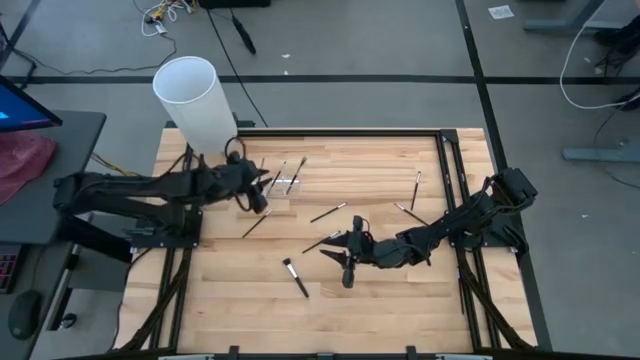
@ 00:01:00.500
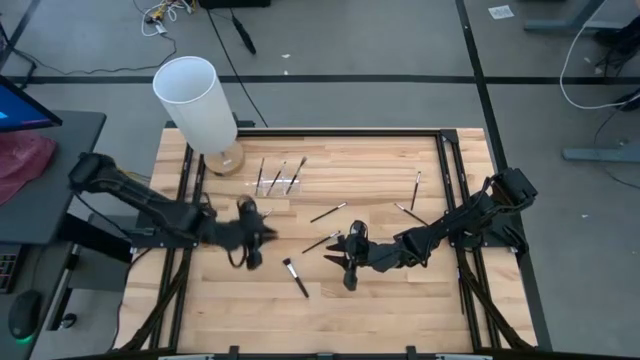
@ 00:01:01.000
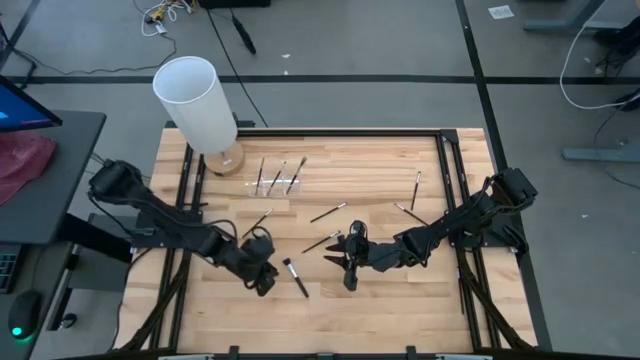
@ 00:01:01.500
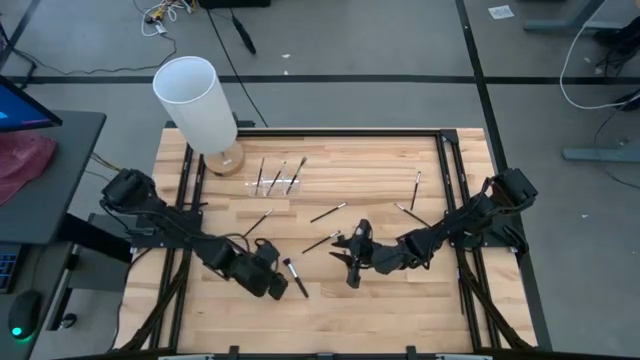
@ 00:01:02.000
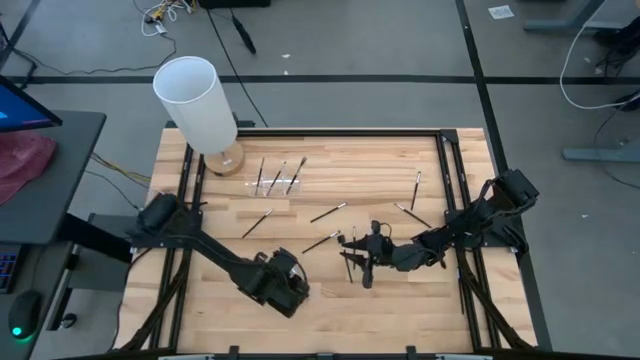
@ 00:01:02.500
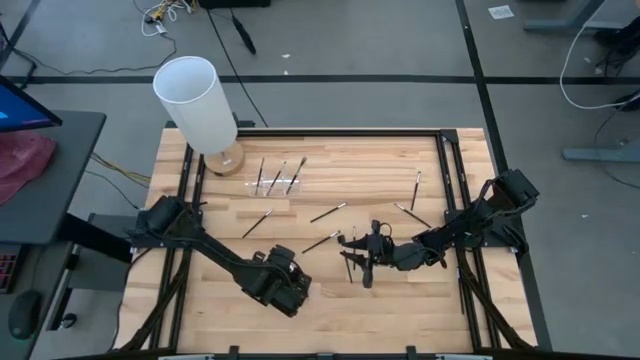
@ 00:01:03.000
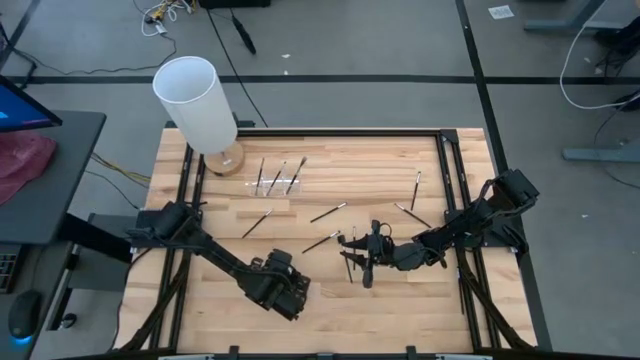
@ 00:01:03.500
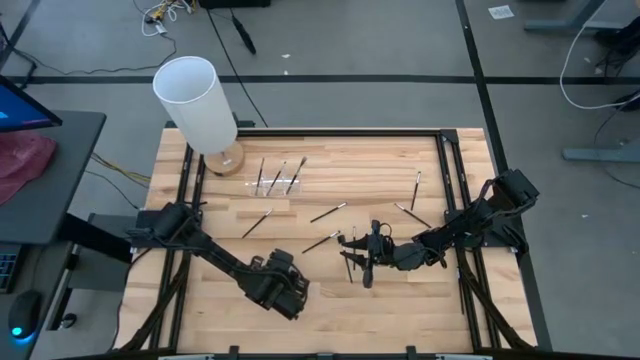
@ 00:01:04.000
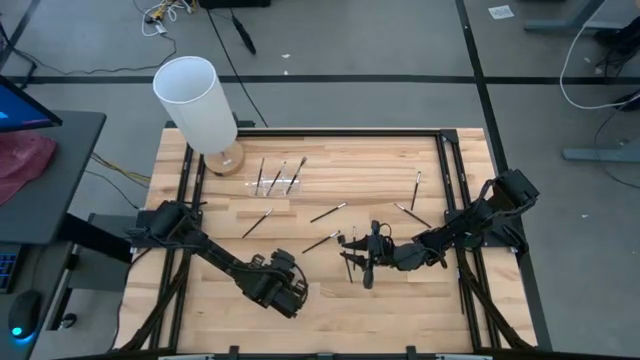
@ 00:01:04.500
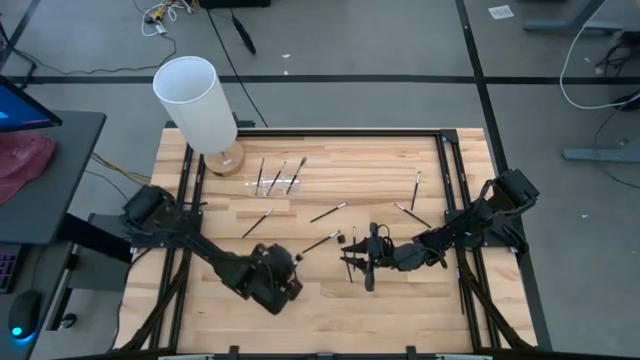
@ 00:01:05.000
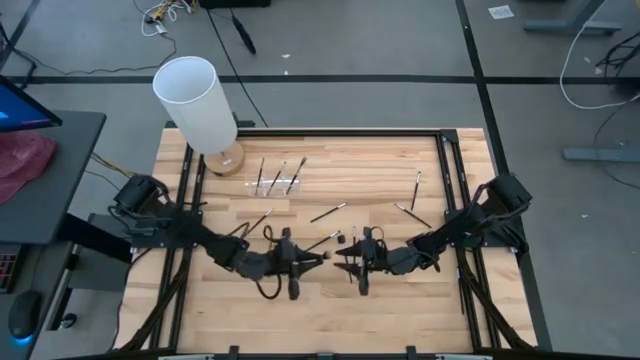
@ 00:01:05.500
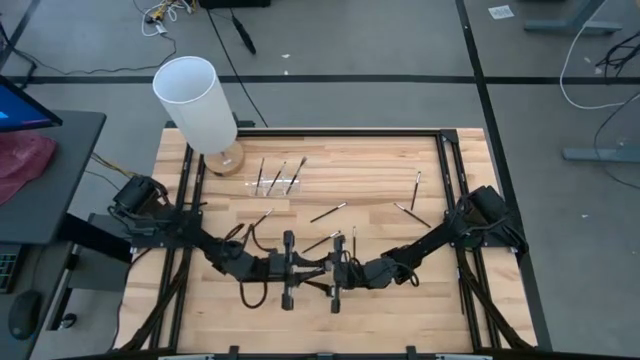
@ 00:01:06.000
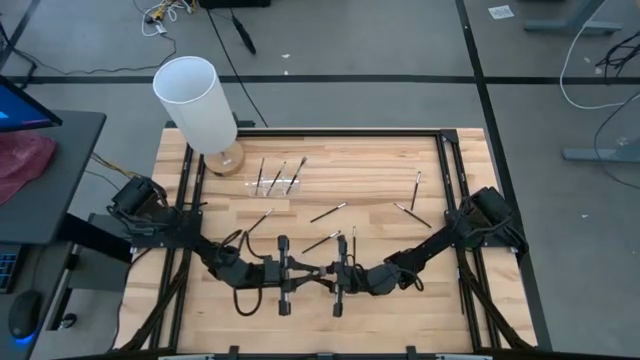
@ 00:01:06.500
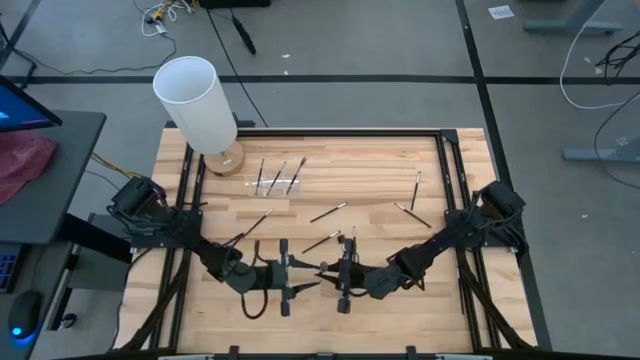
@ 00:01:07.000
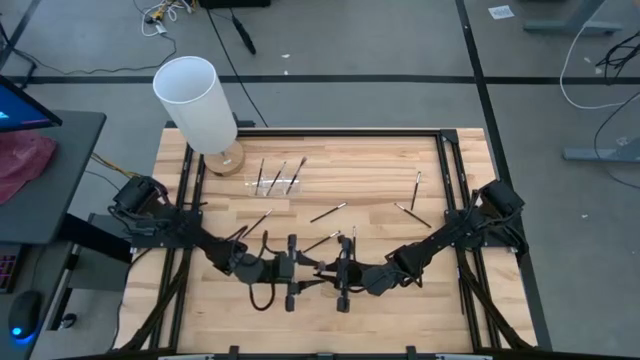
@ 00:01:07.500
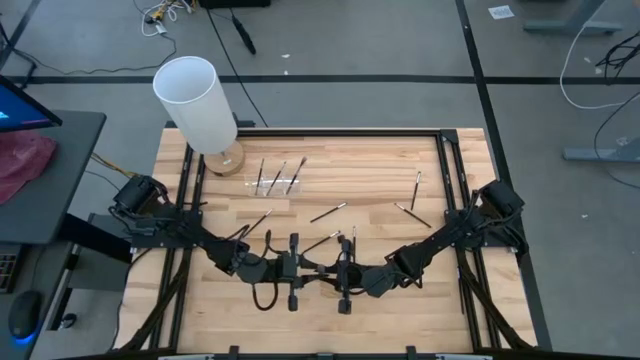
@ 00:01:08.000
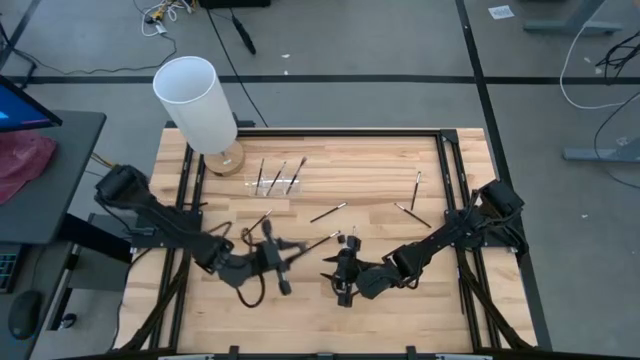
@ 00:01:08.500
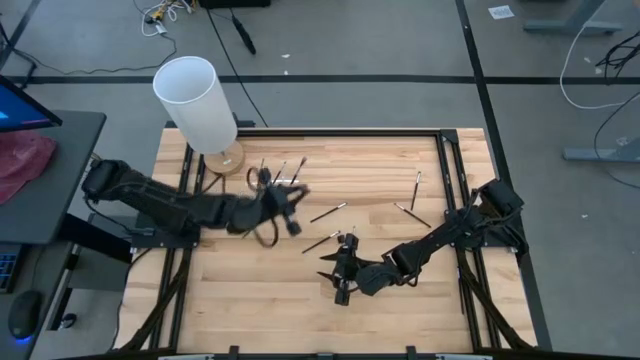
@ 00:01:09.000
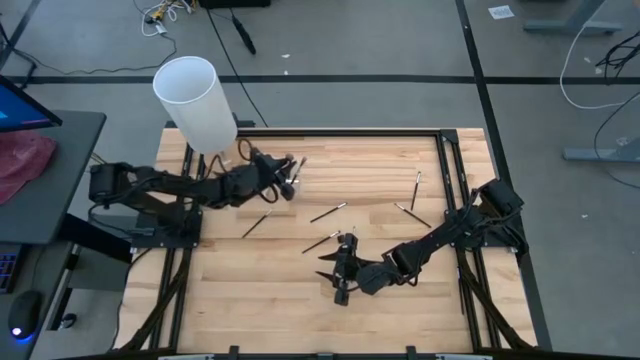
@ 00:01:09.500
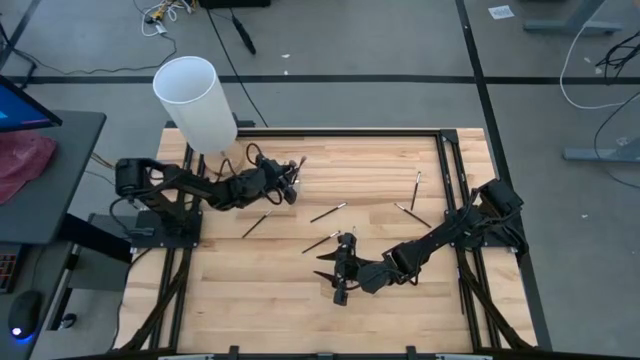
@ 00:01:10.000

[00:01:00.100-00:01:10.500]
Task: Put items in baskets/containers
Put the powder brush into the transparent organizer

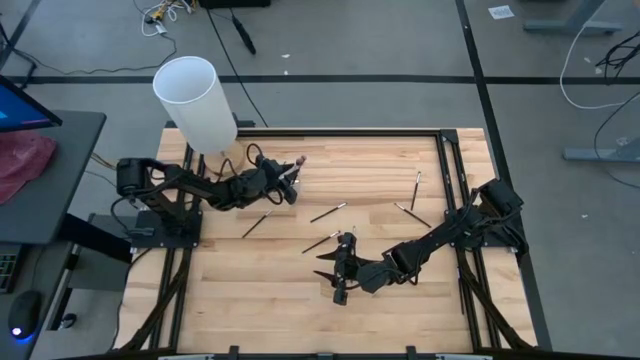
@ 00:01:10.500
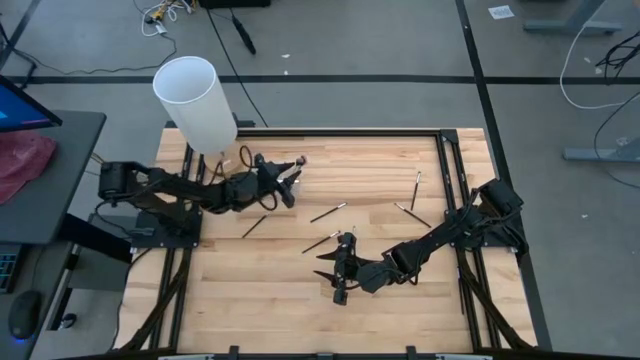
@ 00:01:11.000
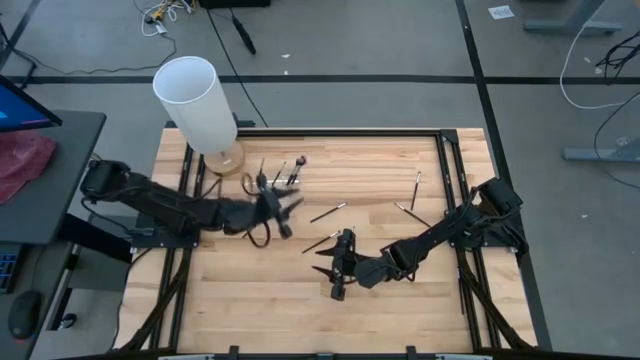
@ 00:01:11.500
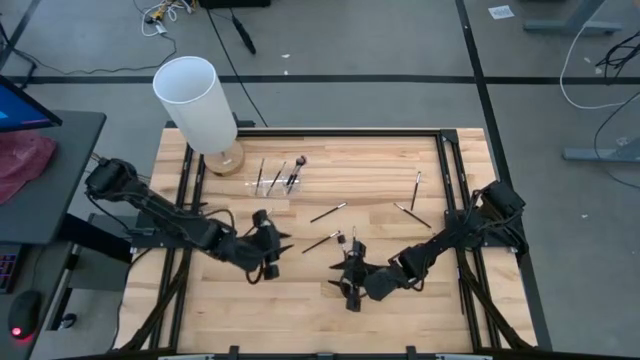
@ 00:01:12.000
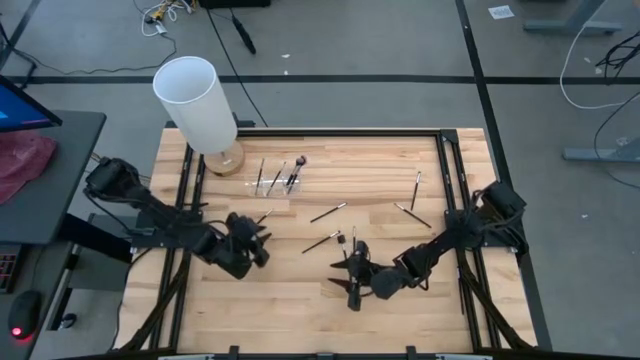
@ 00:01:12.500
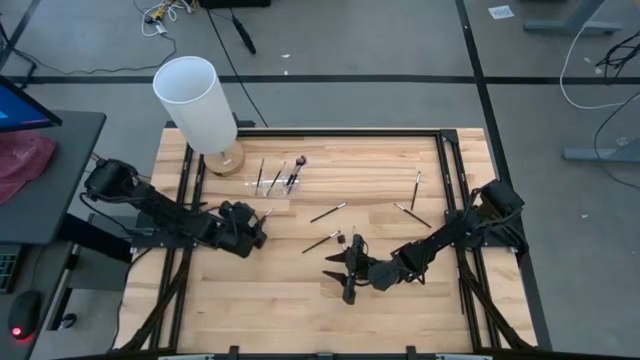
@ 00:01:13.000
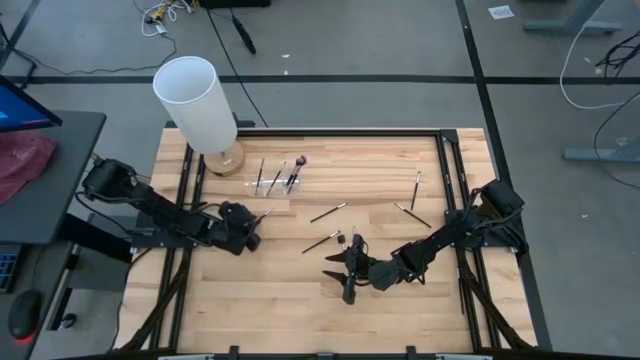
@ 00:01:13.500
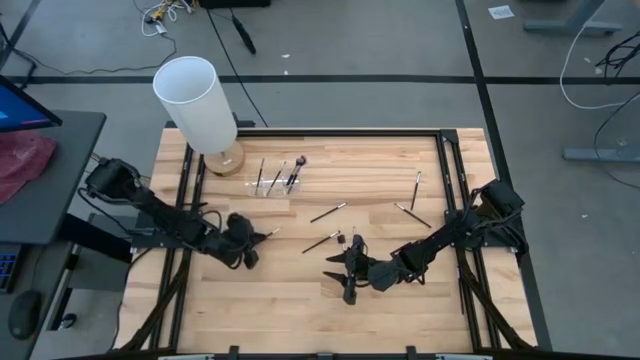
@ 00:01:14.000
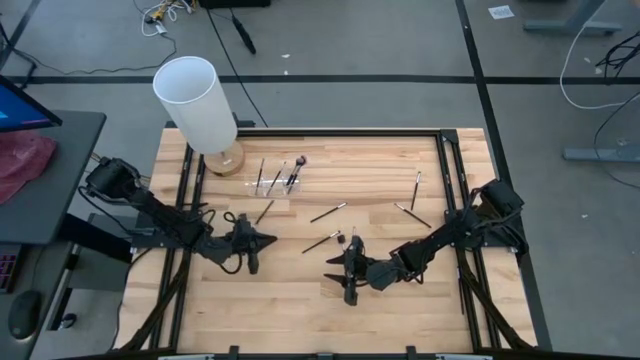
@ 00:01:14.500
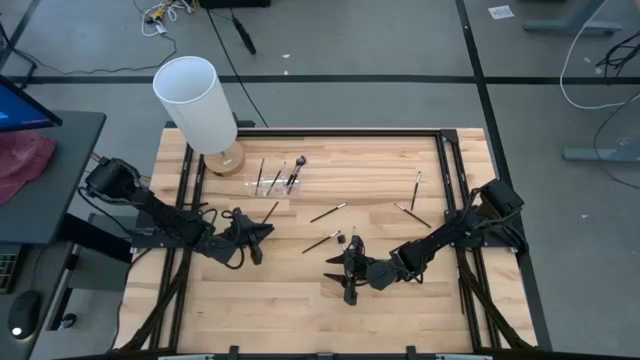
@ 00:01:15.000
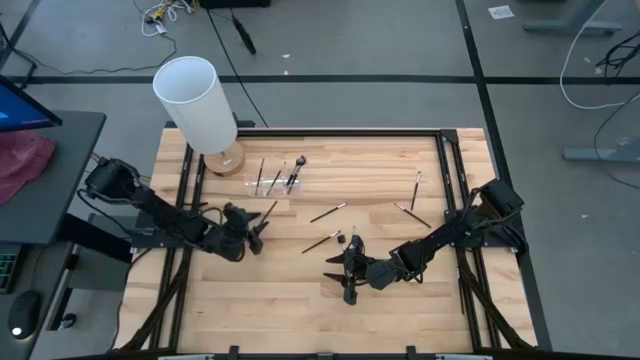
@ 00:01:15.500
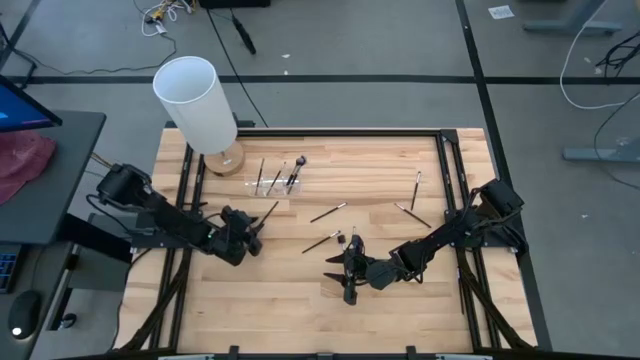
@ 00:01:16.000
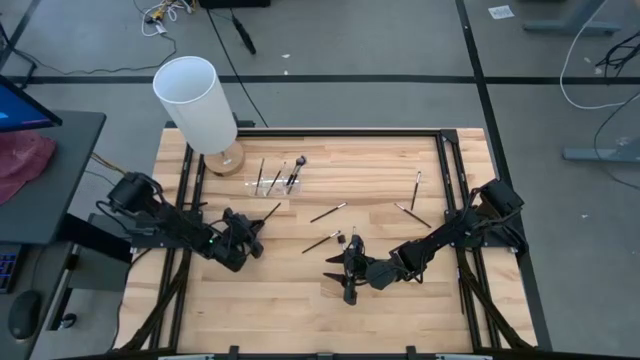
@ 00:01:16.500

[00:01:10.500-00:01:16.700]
Put the liner brush into the transparent organizer

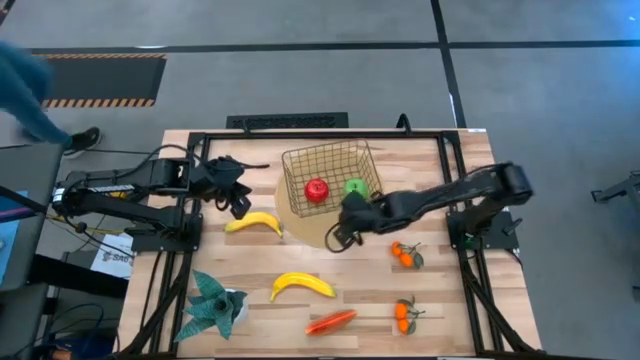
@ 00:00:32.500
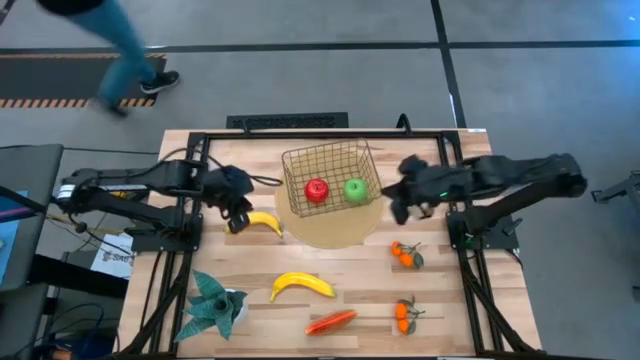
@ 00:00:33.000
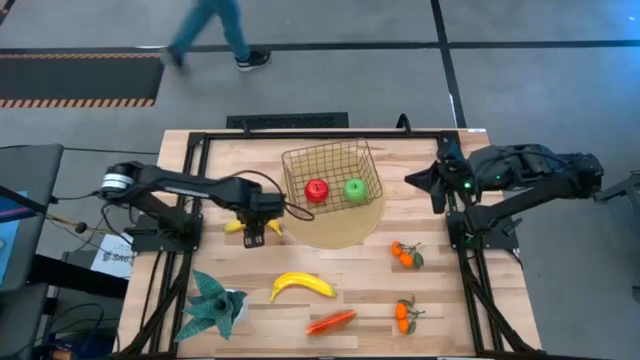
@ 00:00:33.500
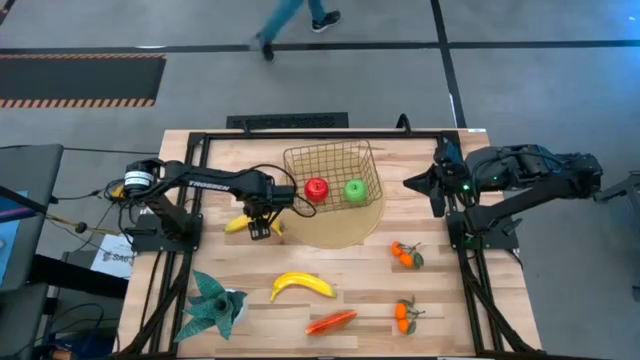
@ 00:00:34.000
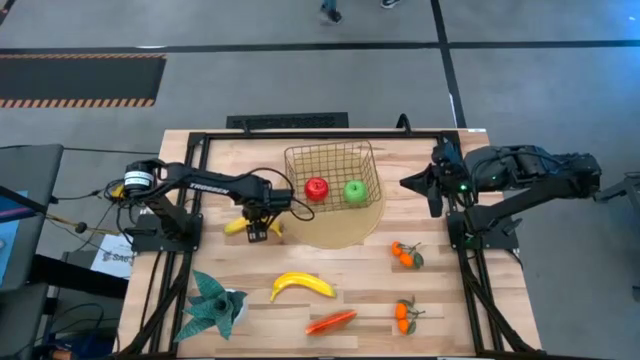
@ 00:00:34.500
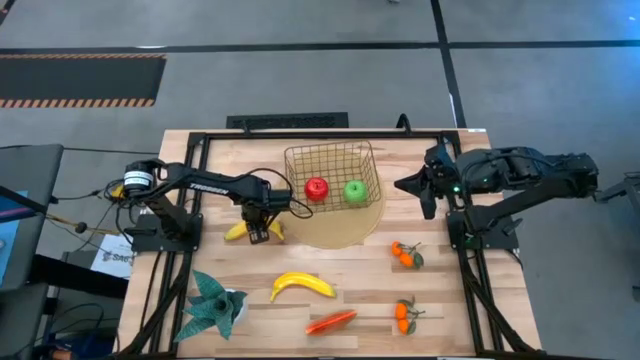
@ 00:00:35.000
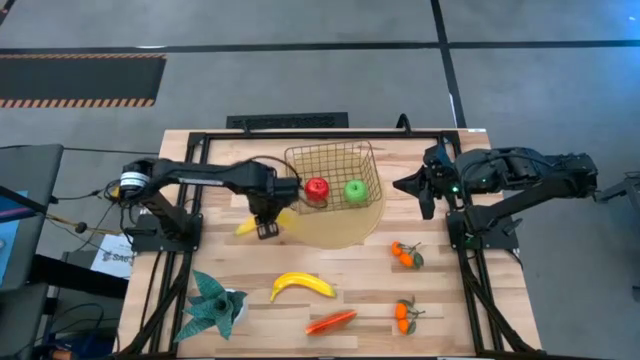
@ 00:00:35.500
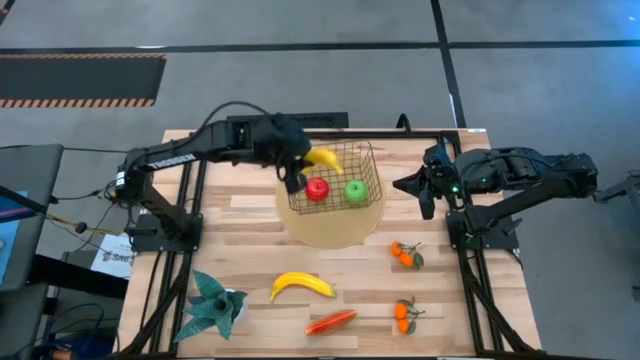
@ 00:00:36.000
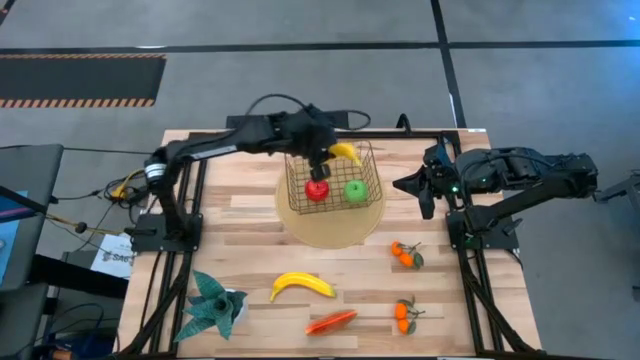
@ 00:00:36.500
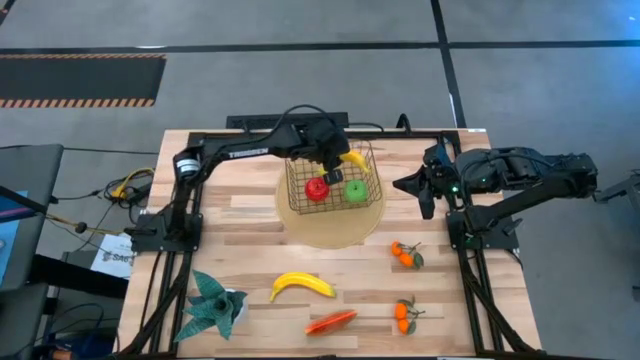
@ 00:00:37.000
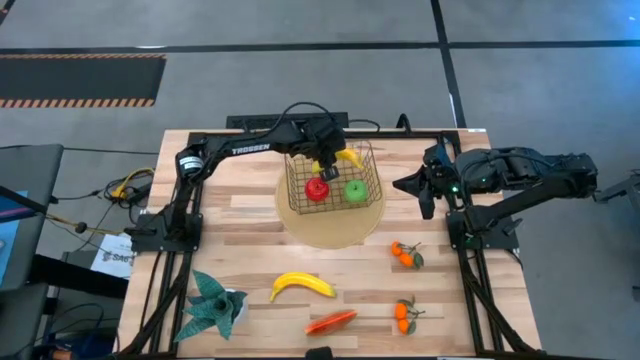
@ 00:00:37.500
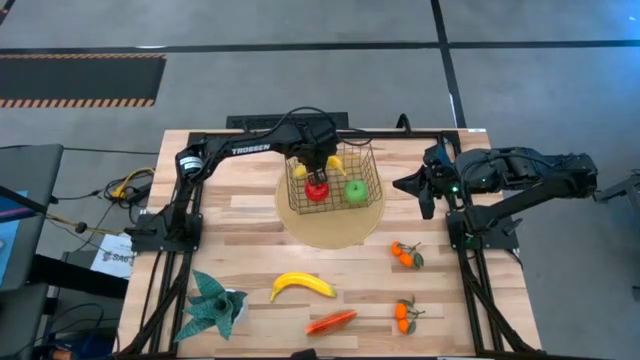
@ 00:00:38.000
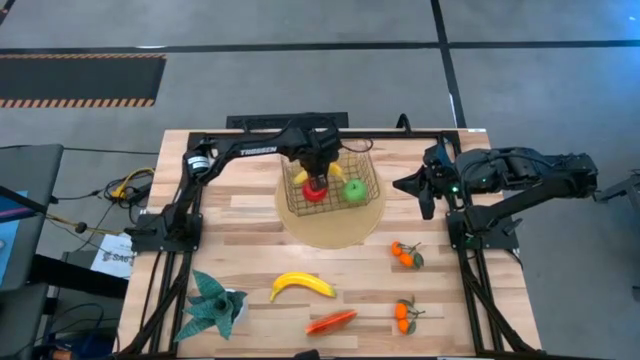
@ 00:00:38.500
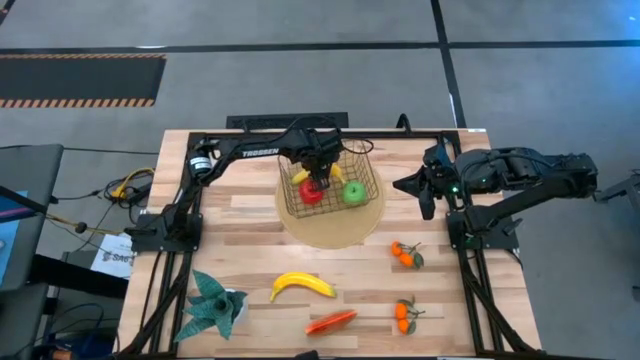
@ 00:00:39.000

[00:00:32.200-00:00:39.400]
Task: Build produce basket
Put the banana into the basket
